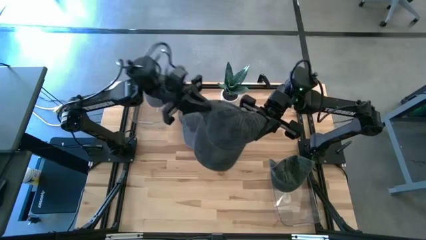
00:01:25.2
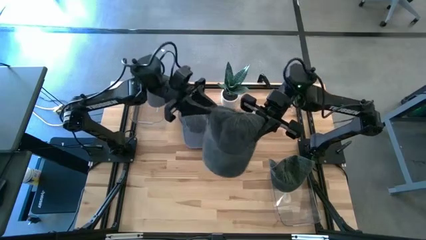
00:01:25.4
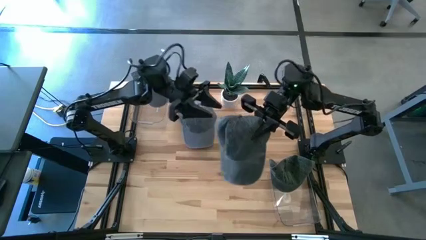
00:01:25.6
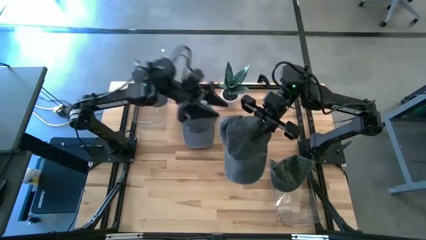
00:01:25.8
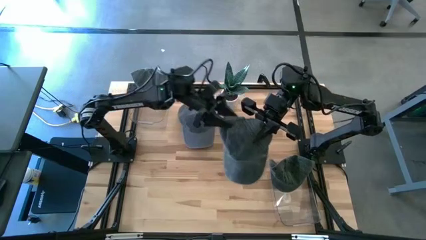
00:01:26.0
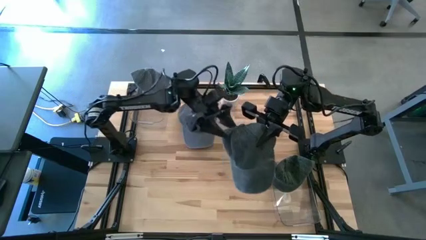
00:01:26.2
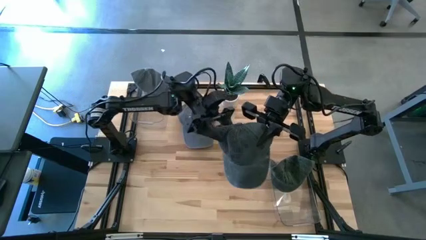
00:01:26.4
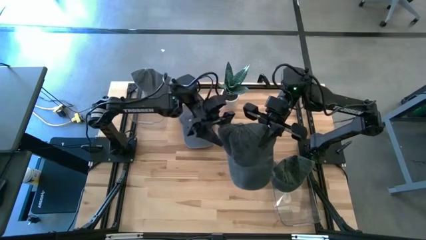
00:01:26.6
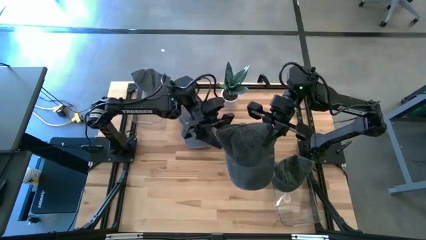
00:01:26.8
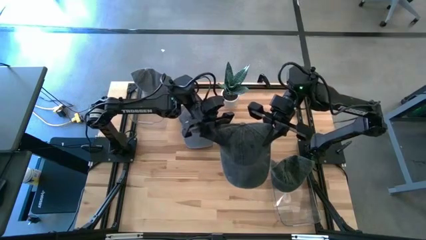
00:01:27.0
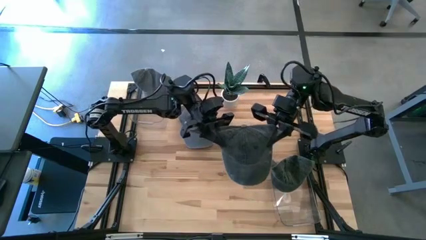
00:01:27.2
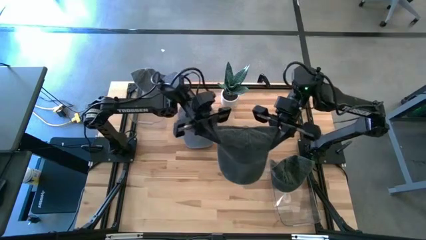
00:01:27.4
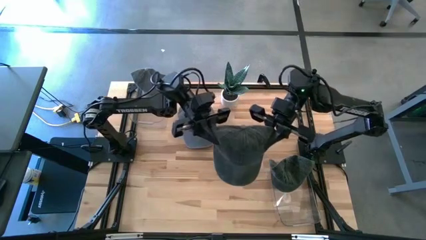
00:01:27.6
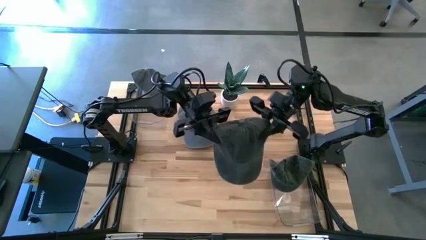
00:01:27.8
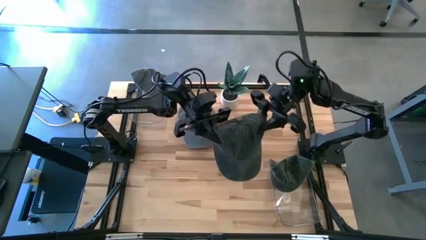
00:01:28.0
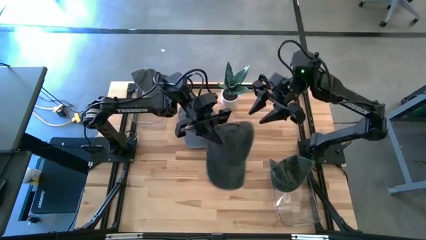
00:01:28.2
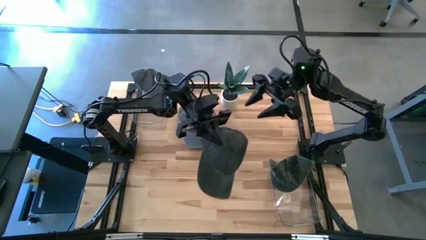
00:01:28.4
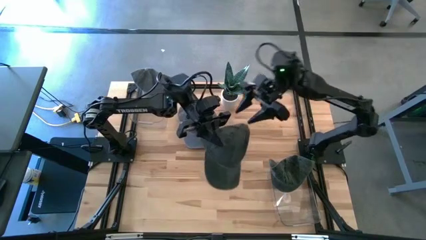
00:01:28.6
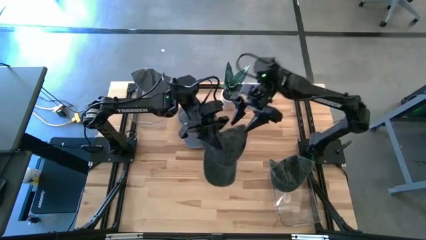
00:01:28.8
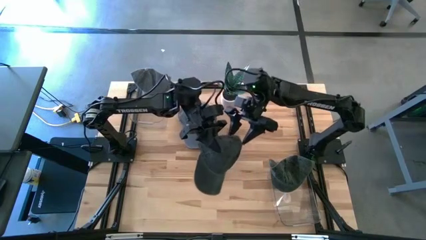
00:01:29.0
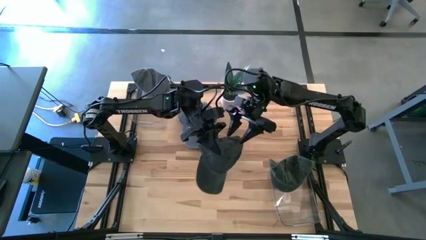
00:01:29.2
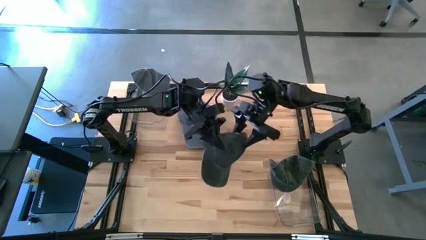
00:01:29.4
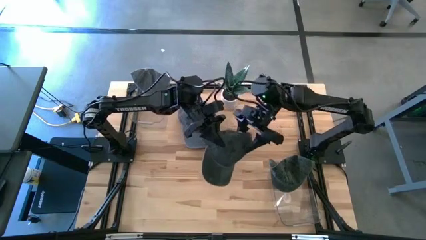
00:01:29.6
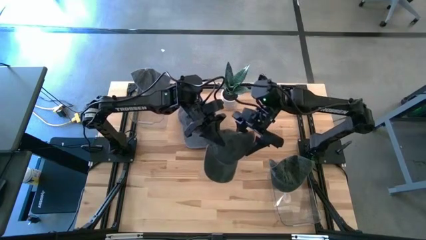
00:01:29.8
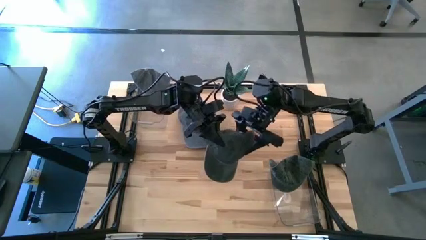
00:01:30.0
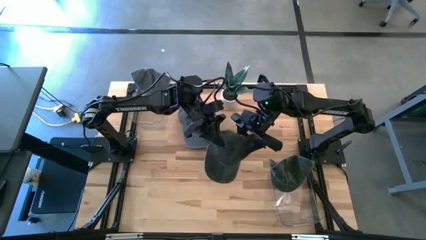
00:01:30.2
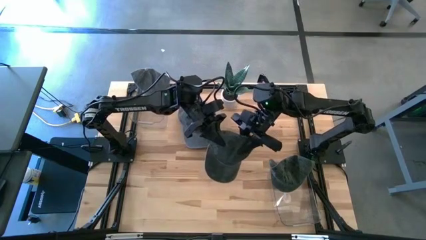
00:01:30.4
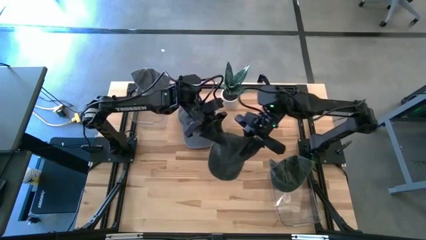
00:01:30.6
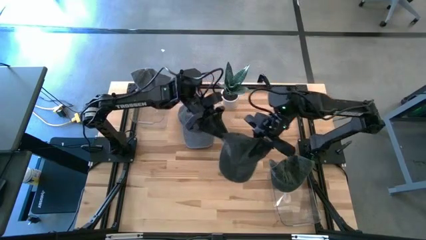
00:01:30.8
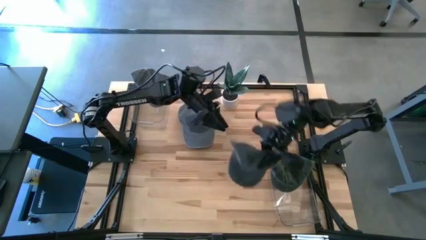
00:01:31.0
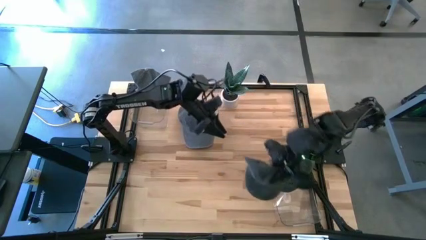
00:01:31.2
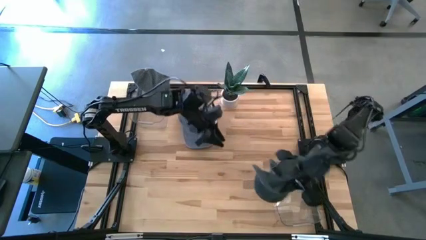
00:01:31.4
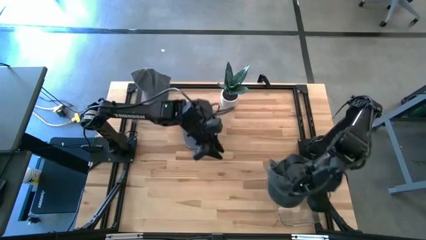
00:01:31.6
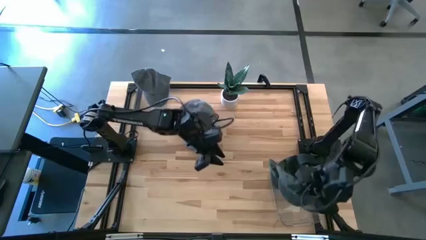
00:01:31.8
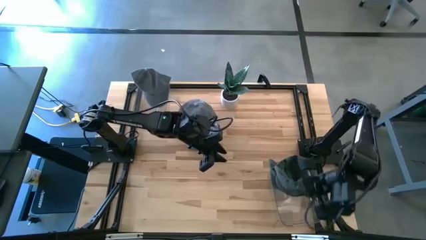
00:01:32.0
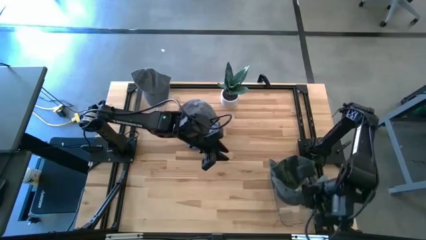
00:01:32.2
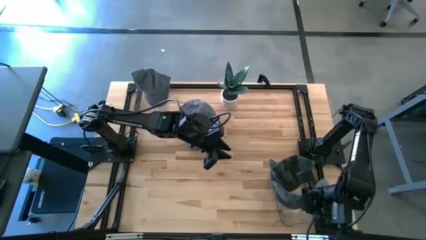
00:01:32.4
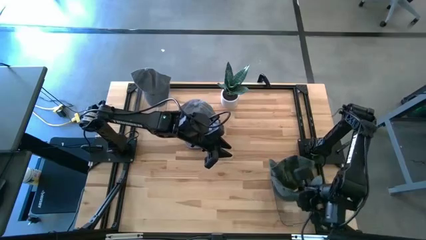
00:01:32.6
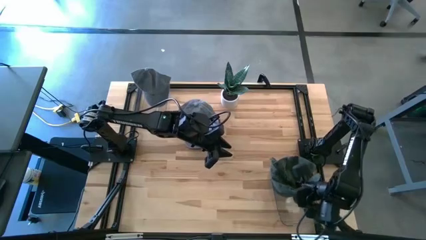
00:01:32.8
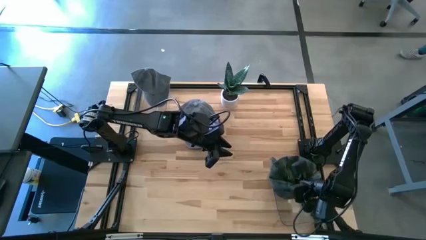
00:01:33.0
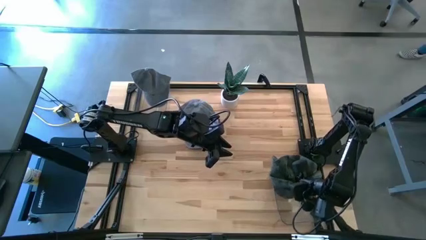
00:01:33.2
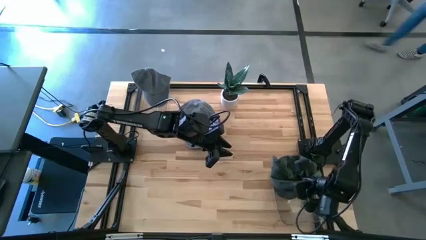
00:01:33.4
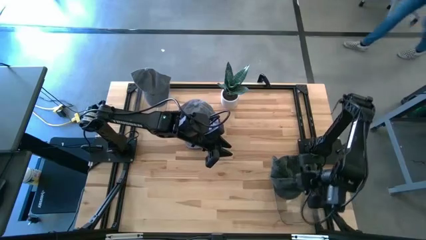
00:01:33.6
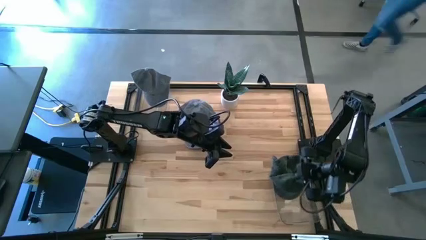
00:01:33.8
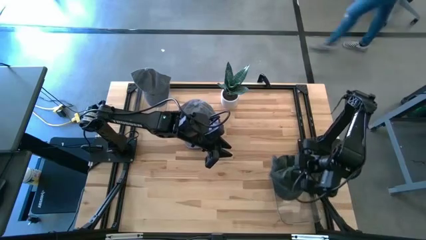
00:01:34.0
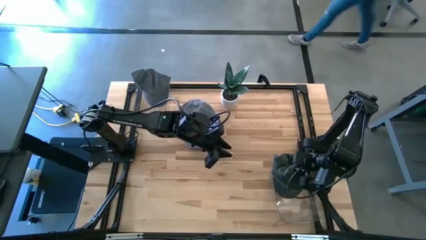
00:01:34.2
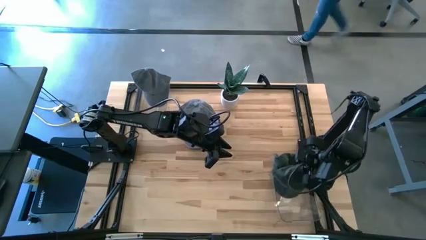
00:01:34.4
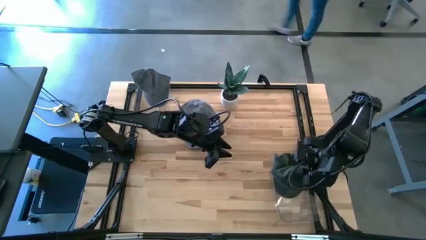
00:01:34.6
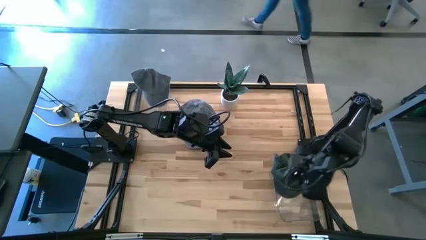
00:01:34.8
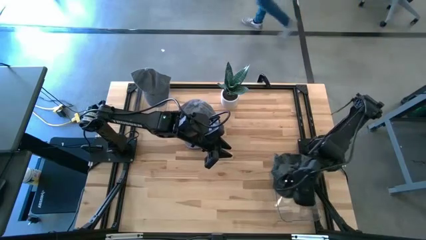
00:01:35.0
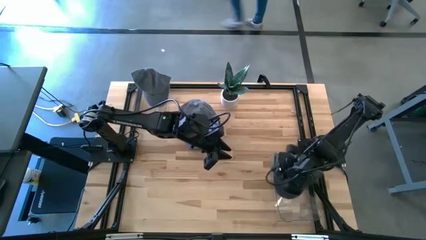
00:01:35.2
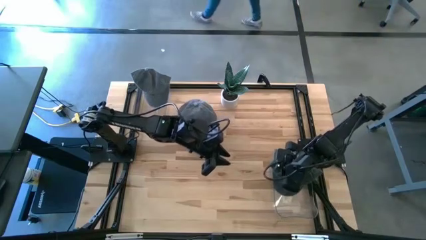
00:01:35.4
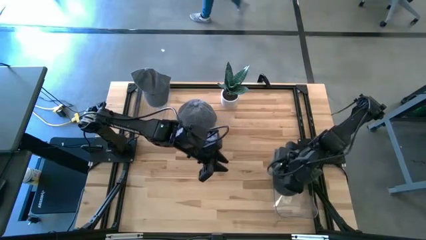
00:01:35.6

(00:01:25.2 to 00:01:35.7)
Task: Pick & Place hat
Put the black cap into the bottom transparent bin
